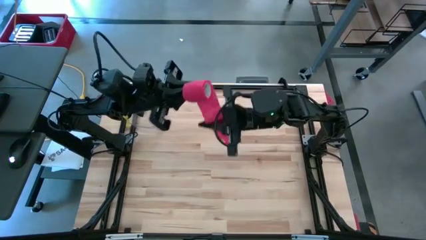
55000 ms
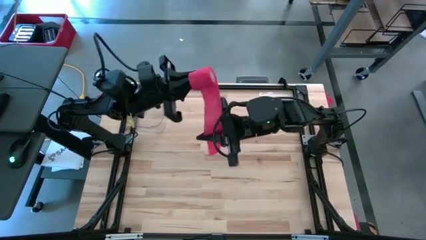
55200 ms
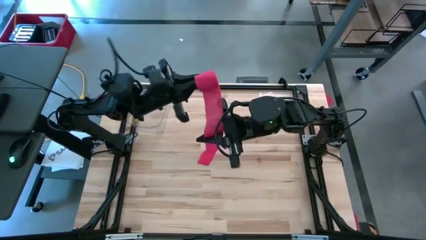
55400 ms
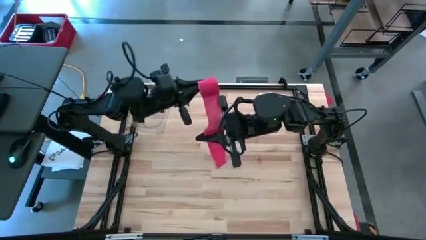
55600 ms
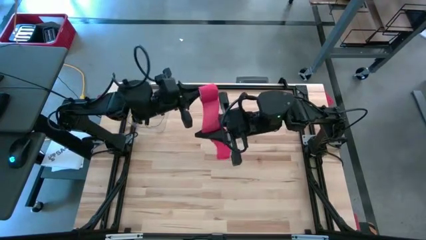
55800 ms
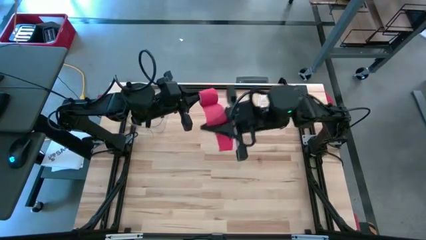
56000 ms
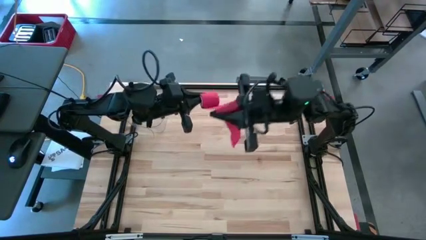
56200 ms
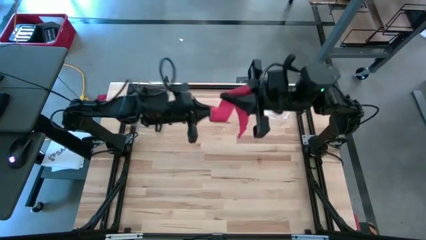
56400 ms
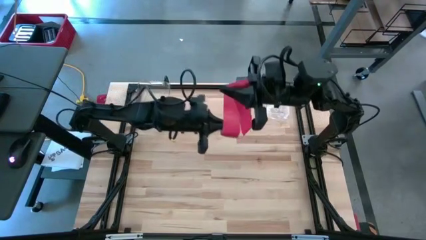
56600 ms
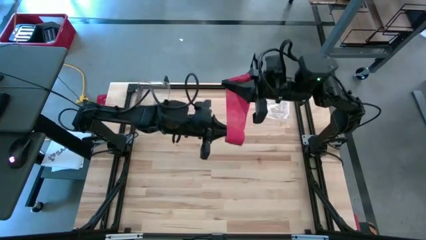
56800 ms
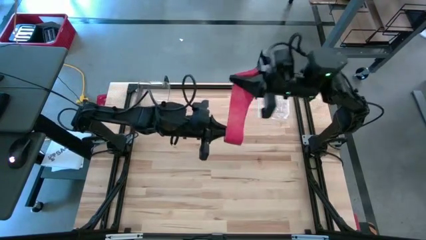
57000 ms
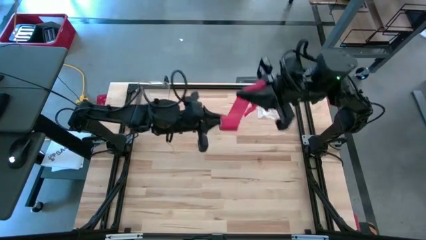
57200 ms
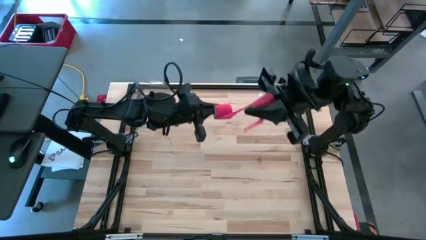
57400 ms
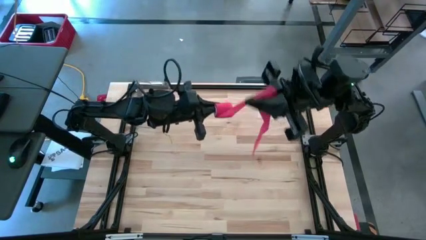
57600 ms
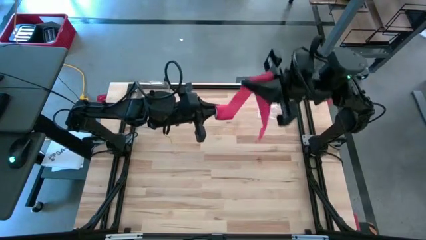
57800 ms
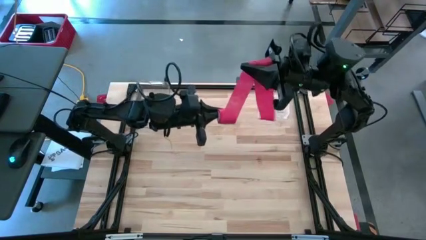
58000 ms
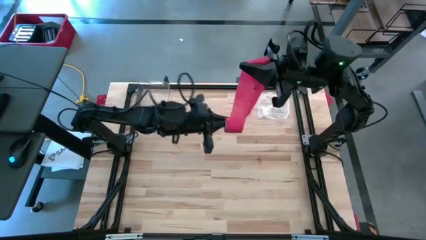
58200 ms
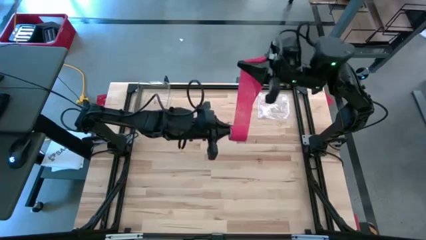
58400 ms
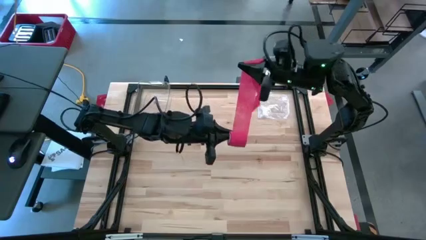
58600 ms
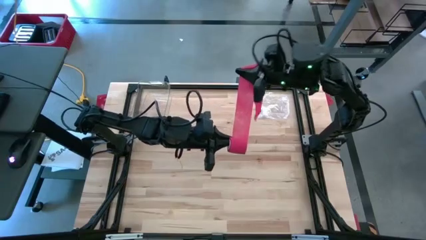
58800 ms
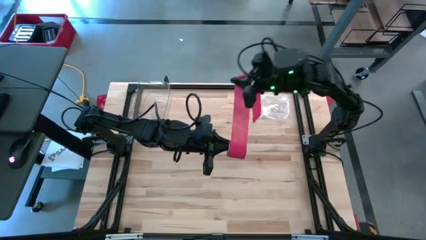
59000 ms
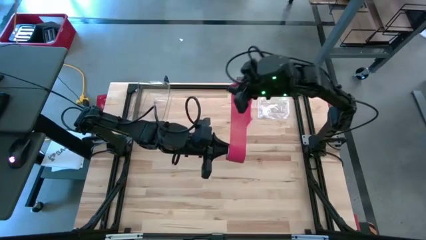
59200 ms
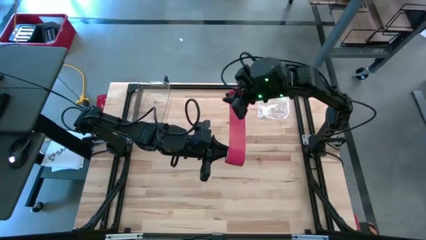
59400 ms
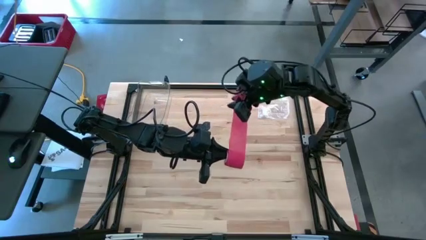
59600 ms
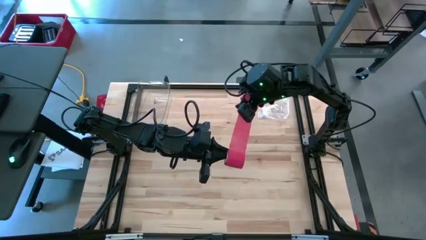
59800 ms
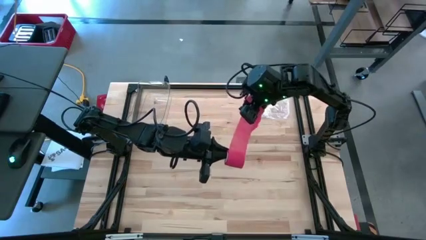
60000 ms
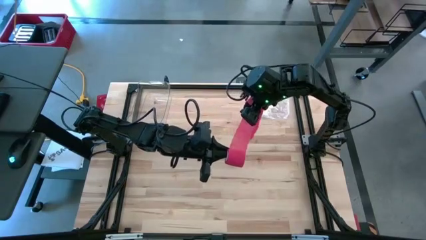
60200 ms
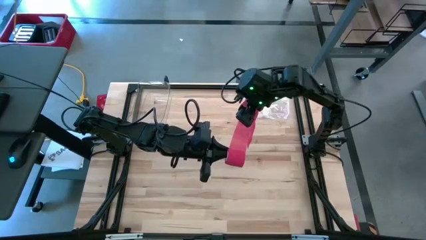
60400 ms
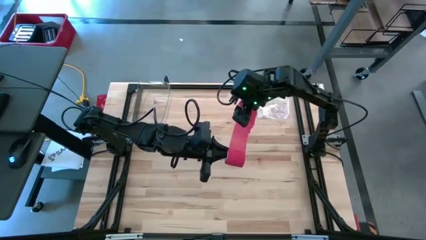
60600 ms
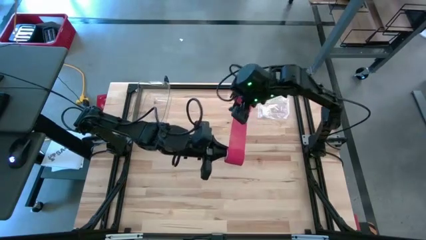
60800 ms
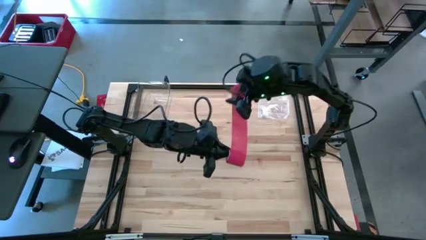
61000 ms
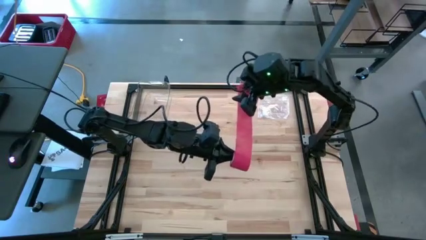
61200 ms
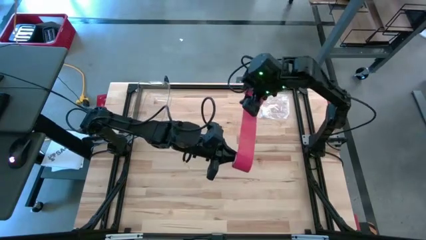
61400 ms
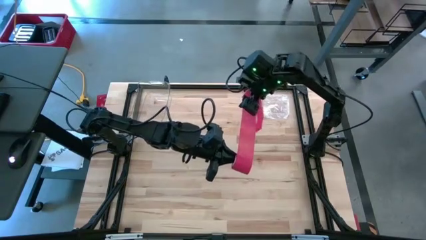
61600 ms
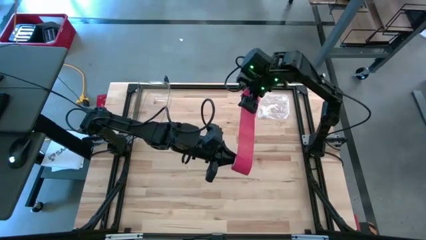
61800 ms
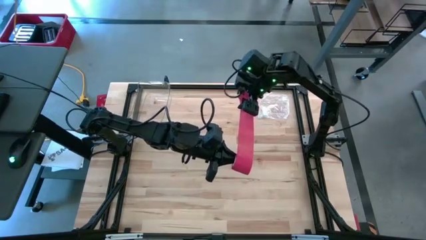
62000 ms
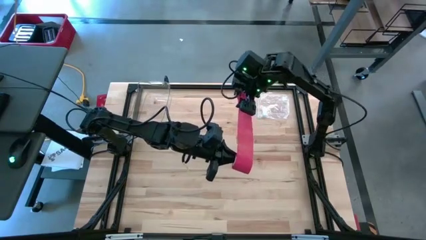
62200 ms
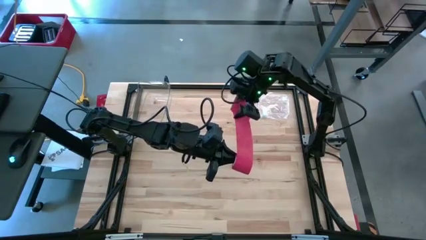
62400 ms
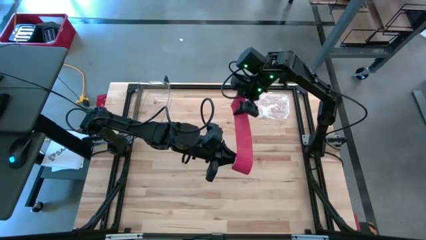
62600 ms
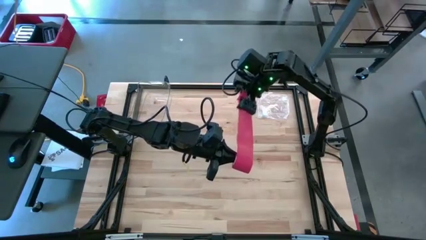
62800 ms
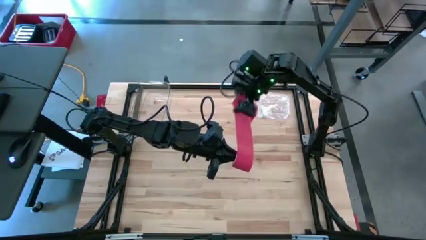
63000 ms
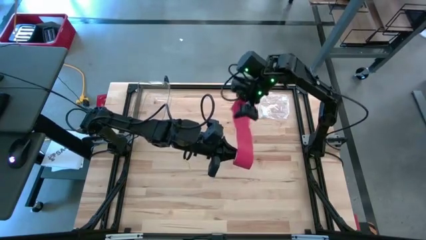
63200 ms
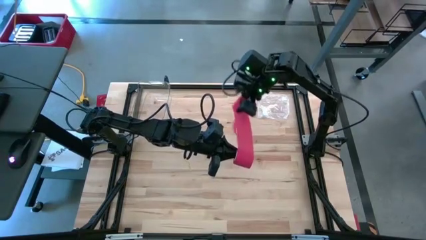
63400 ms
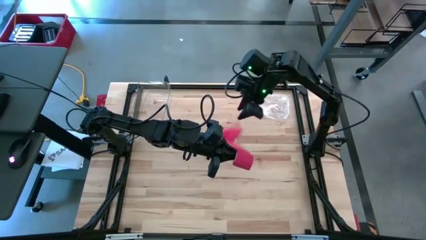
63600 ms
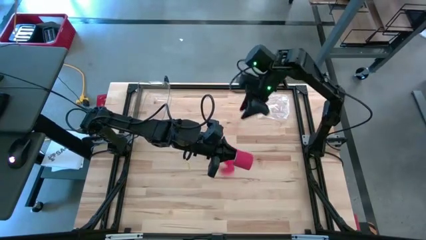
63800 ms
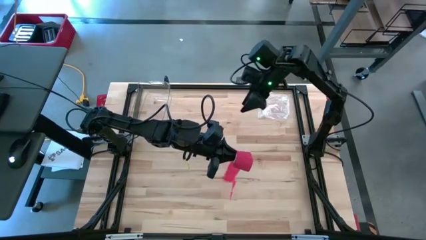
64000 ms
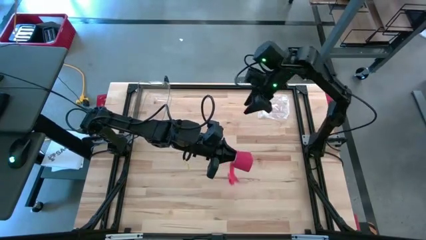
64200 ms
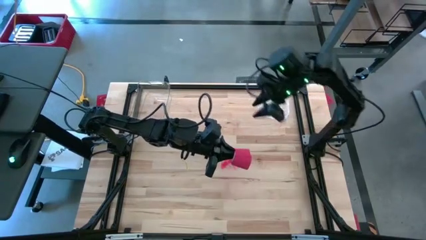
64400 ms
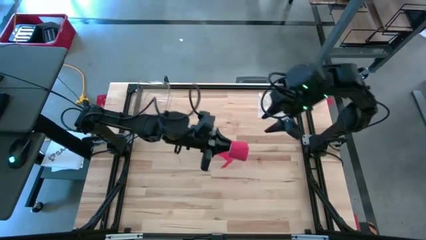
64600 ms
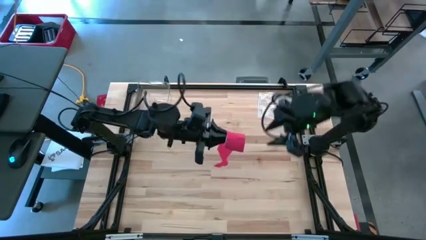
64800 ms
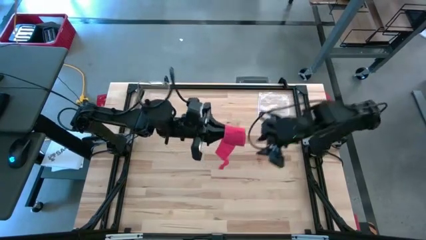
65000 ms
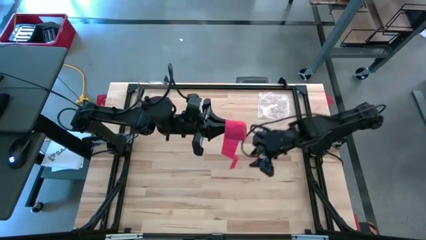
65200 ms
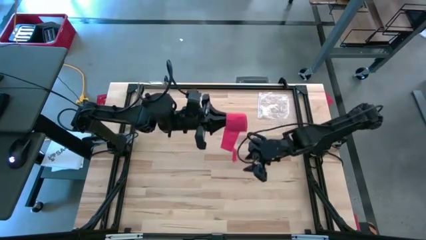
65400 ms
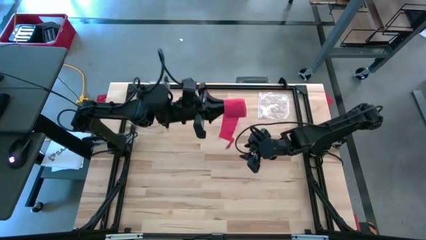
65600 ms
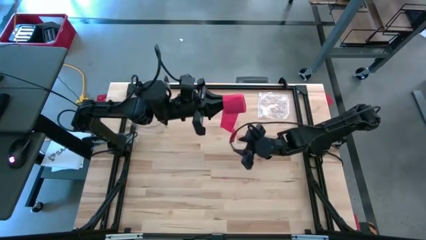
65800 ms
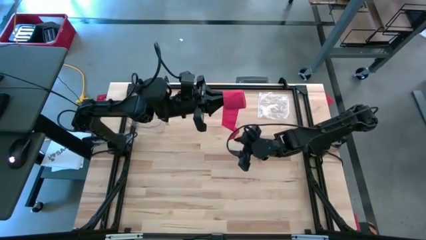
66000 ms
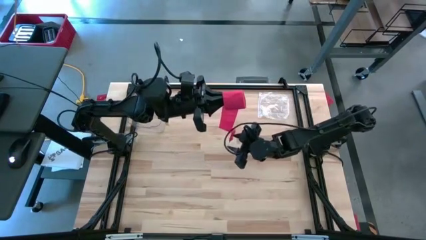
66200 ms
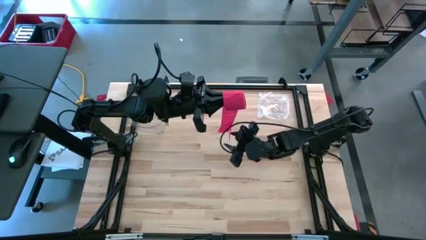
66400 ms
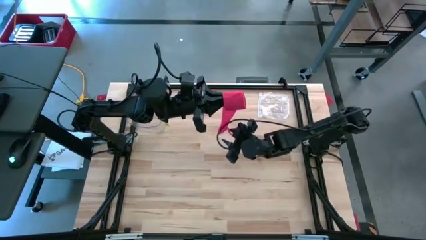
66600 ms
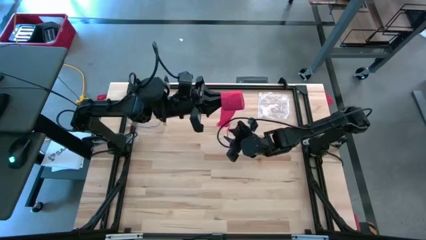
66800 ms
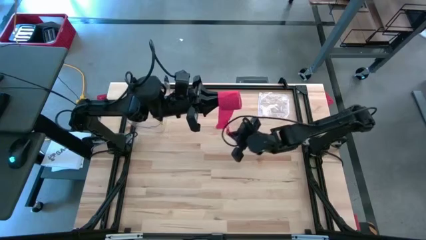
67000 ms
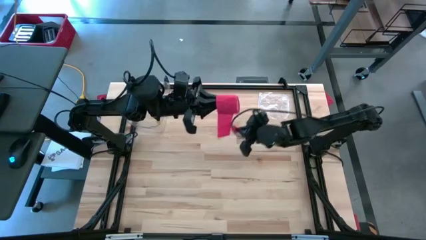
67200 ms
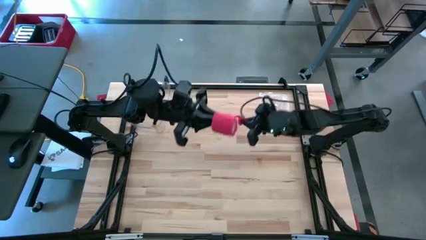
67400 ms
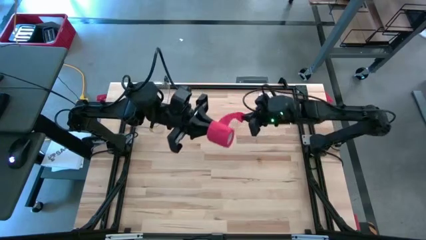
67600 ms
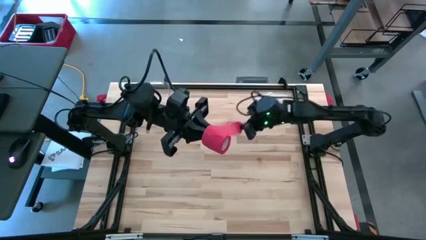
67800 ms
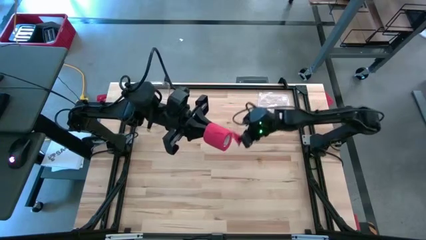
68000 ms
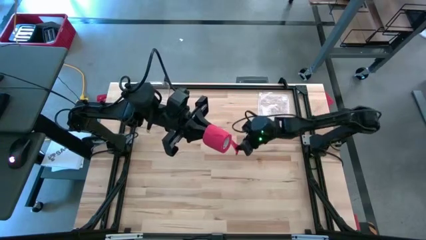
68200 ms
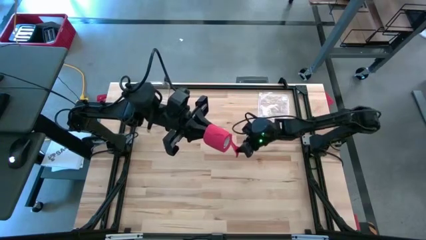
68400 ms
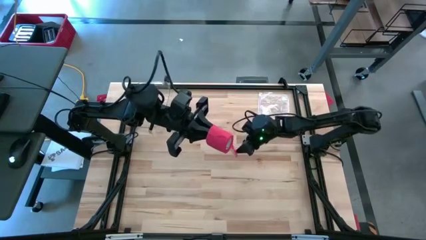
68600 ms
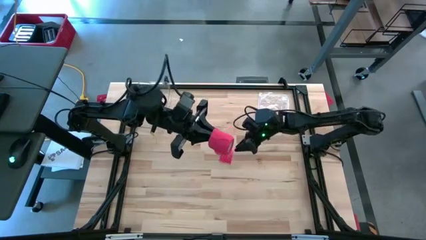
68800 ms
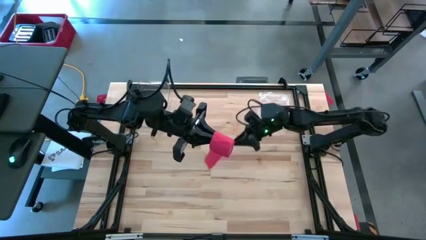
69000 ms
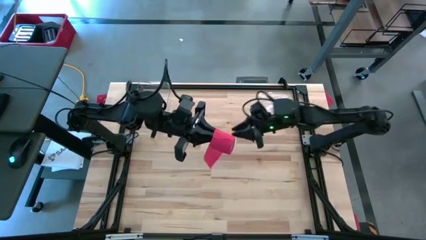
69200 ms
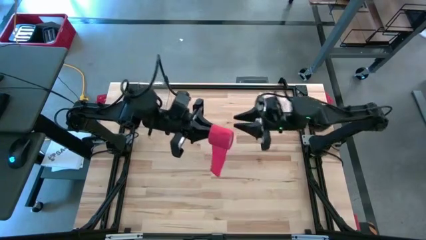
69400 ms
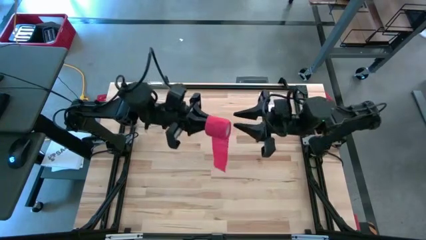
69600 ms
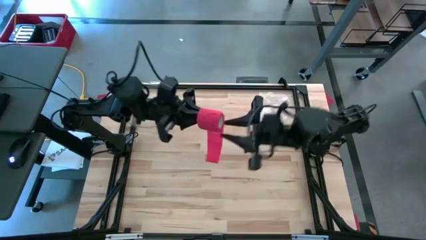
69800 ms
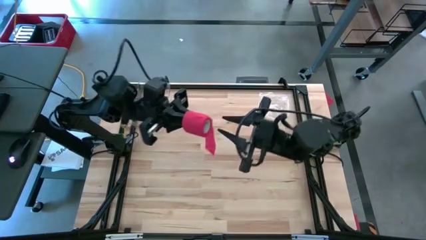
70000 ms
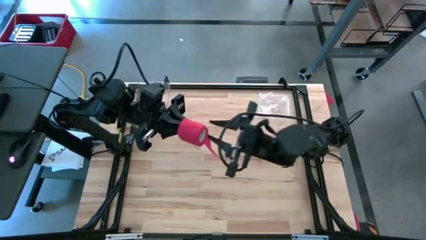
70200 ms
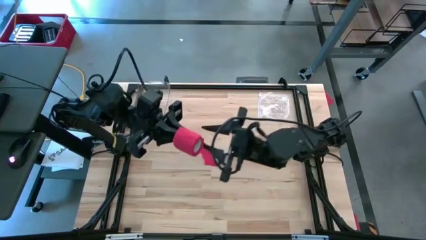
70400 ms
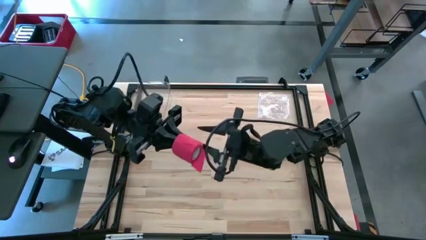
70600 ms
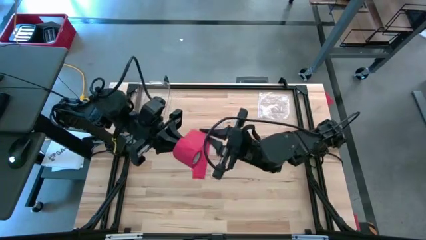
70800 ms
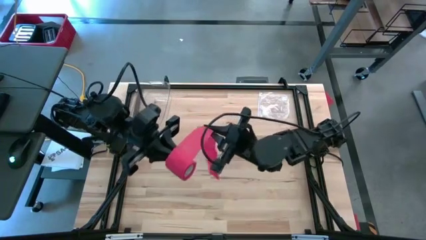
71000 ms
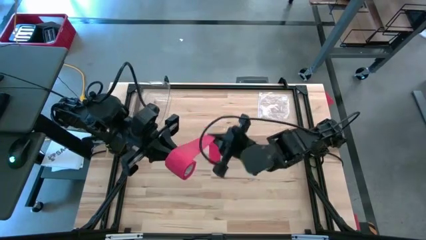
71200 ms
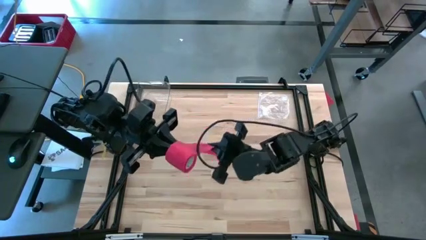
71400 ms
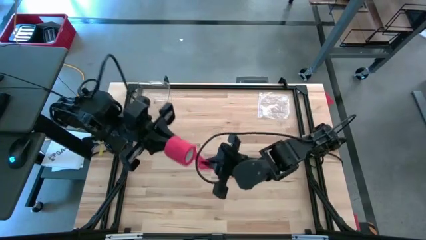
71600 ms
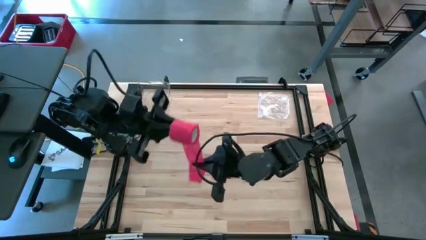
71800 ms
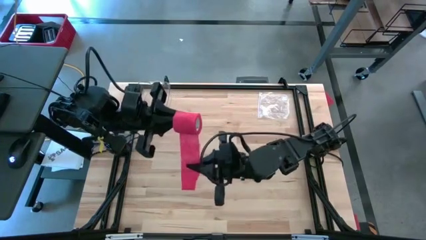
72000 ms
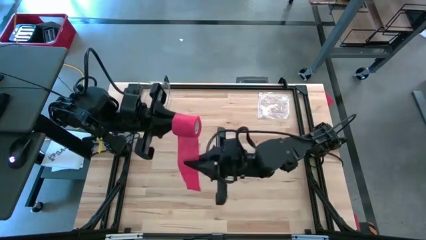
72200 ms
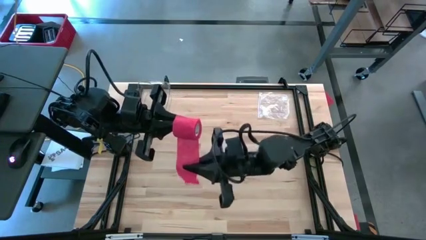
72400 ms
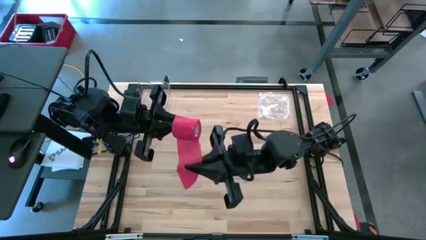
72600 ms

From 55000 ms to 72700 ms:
Task: Roll bandage
Roll the red bandage
